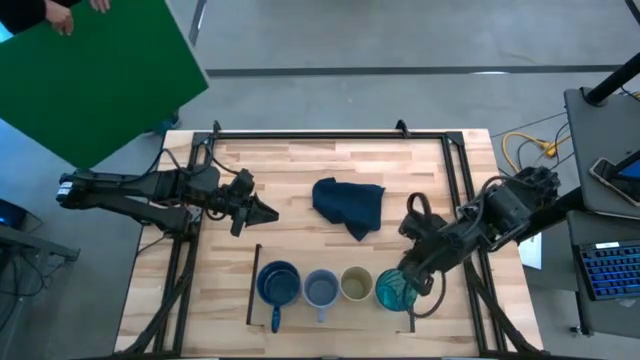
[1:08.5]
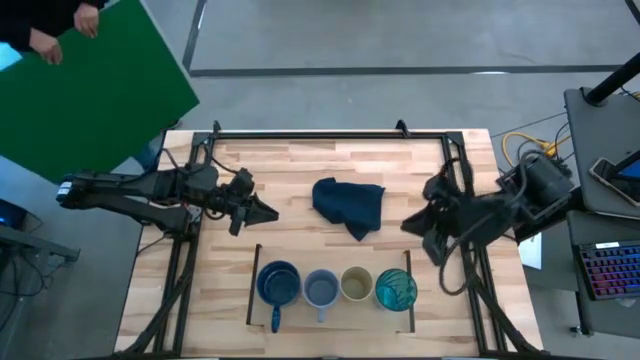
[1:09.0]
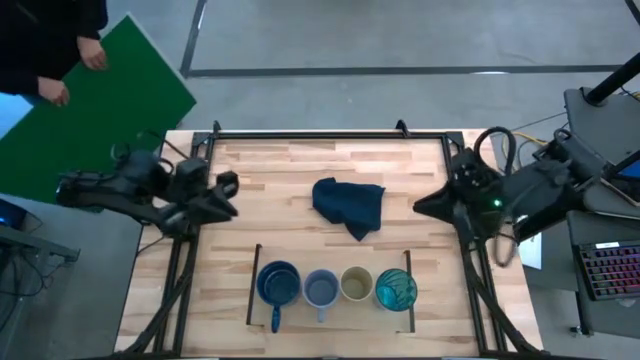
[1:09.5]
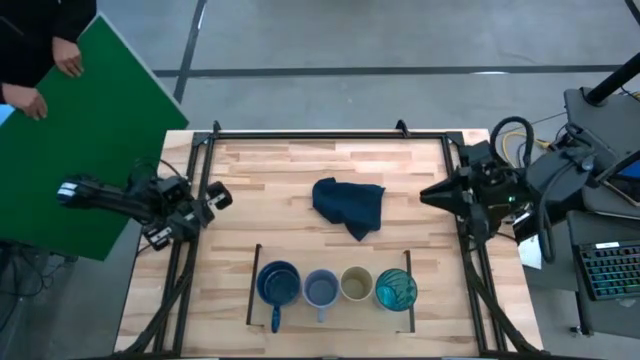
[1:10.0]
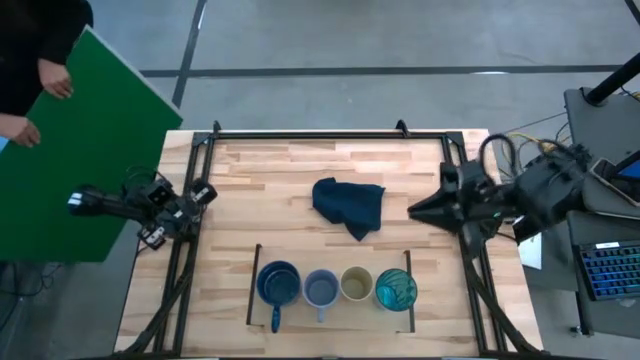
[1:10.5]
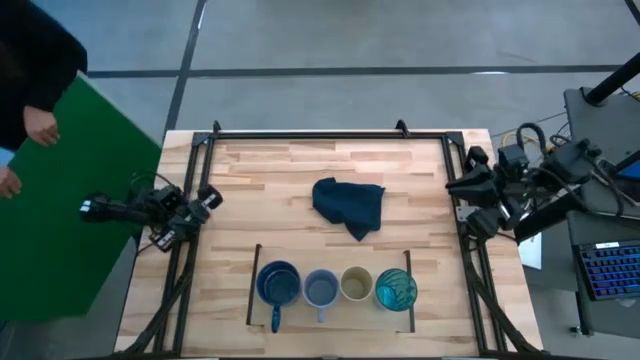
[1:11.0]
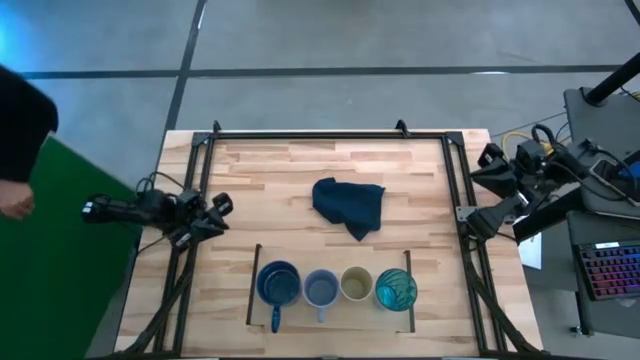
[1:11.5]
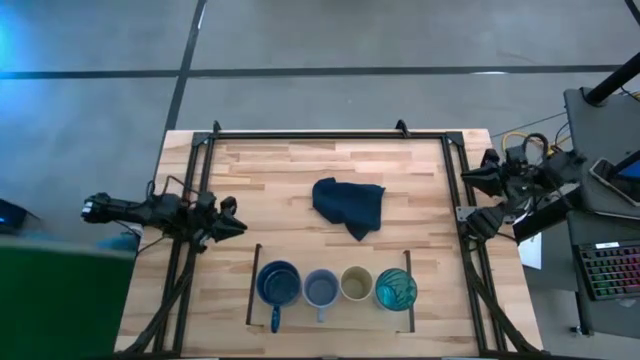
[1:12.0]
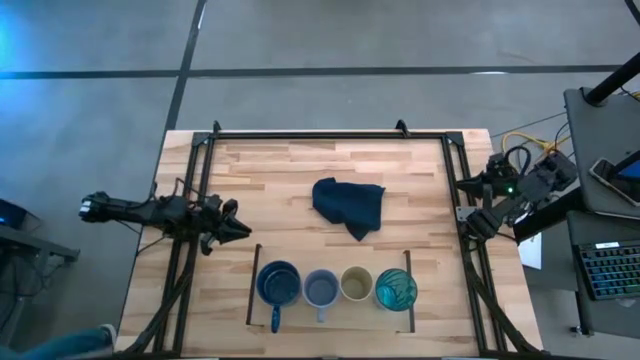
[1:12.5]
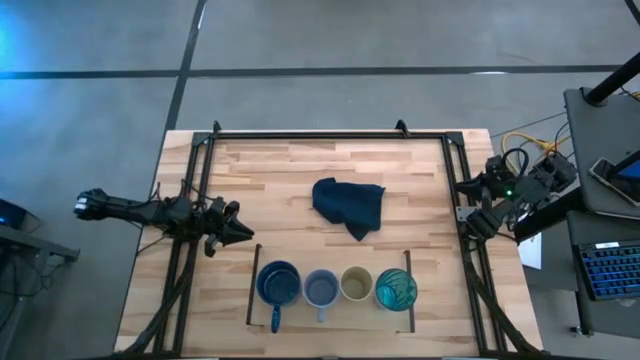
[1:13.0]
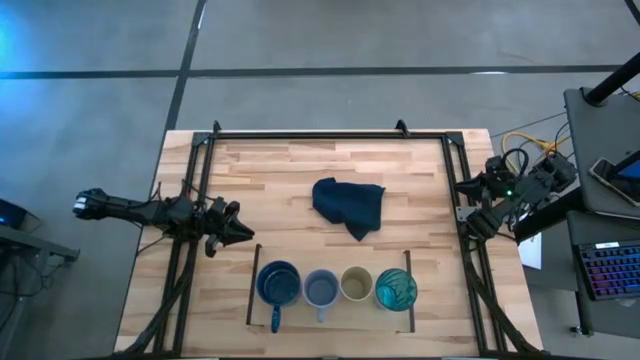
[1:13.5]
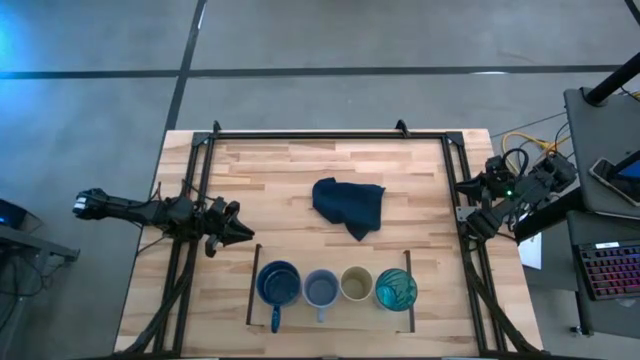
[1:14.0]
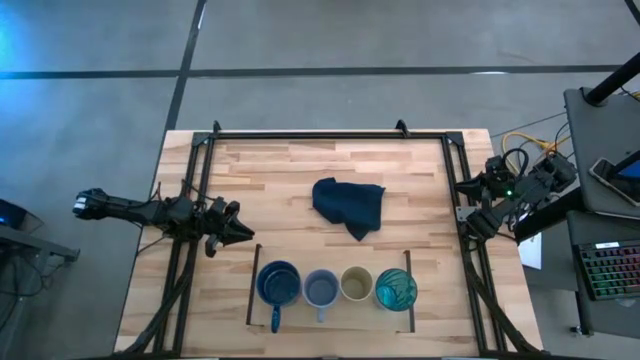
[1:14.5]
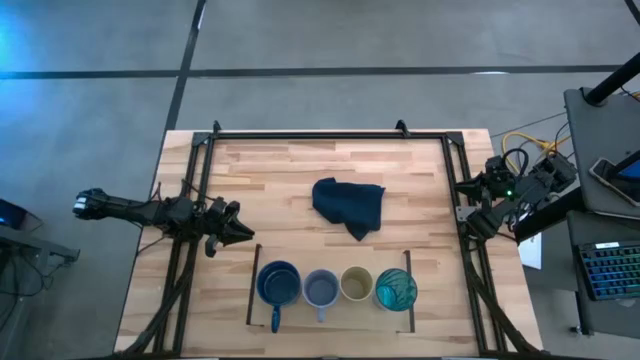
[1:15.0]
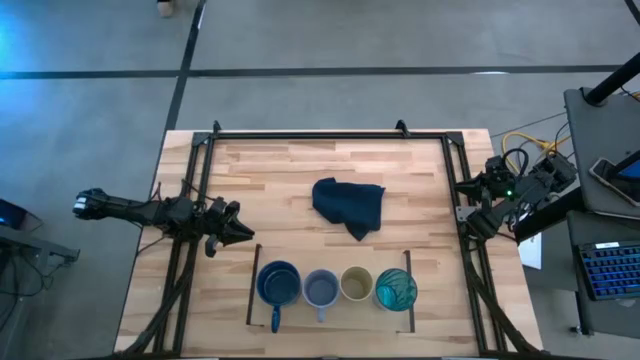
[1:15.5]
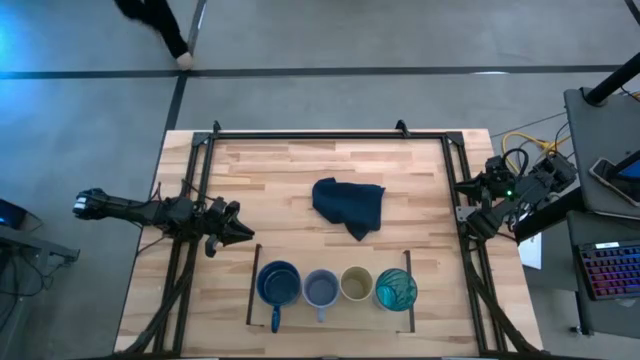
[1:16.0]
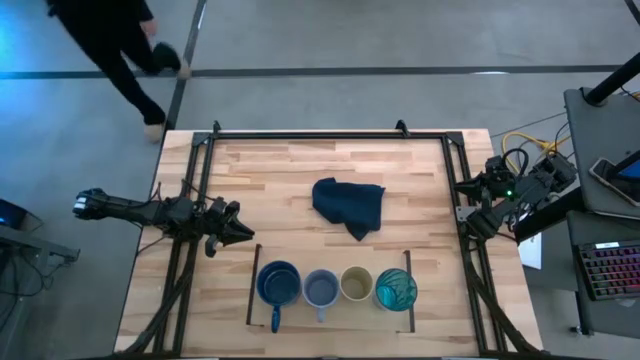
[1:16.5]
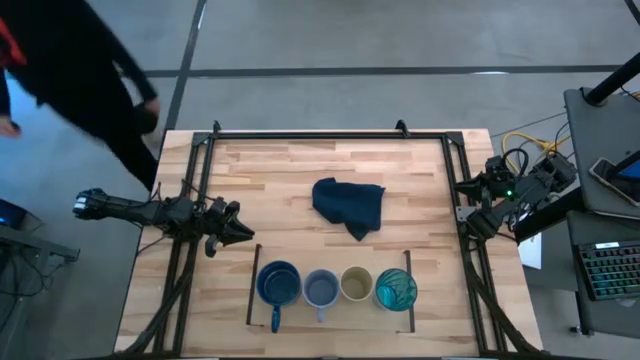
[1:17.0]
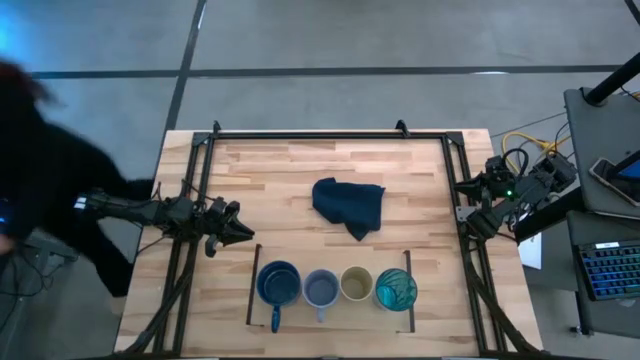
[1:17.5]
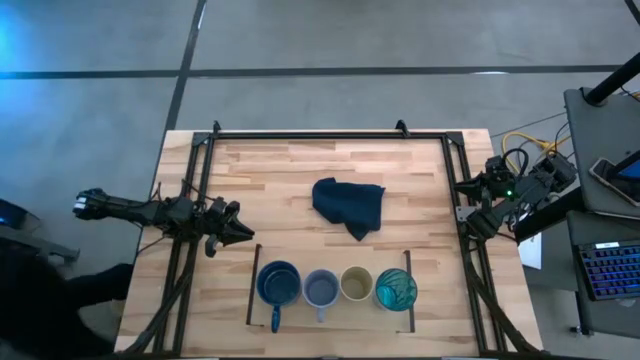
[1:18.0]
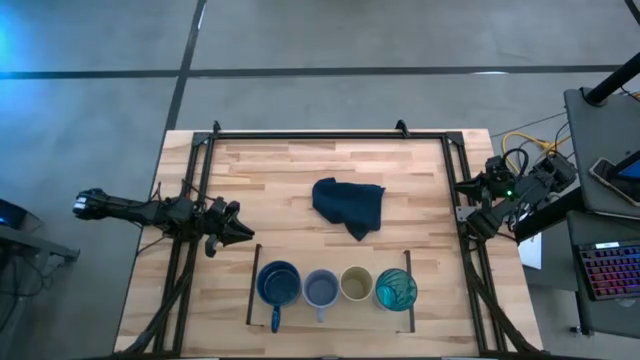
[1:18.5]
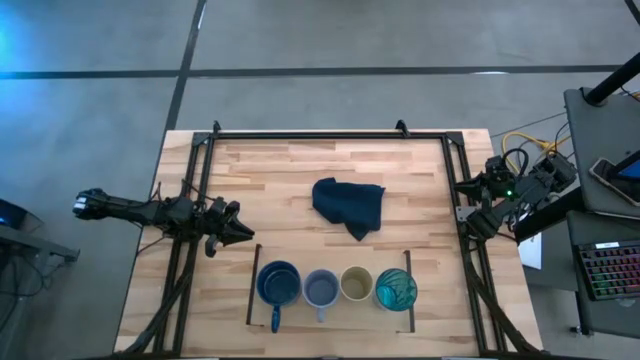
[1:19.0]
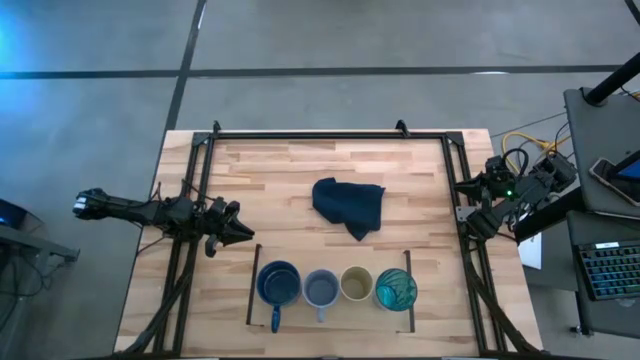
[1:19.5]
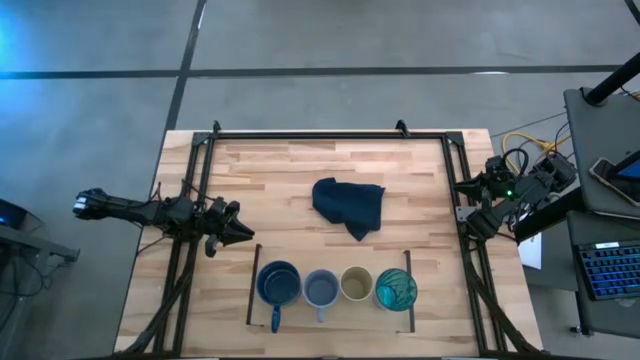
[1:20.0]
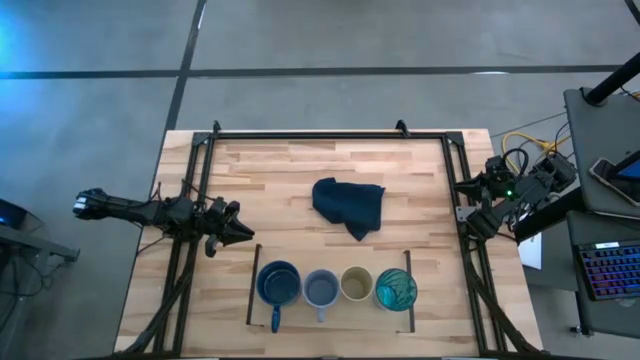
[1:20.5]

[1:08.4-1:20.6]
Task: Stack small to large cups/mugs on shelf
Return to Home Position

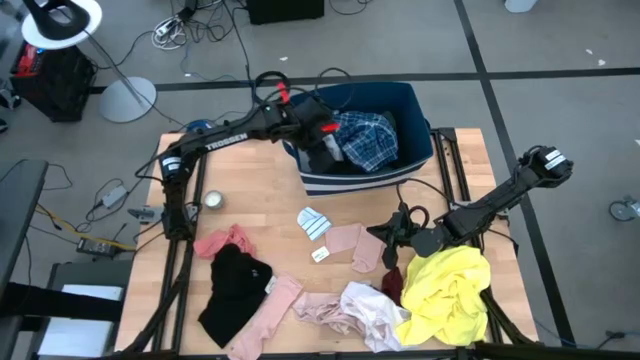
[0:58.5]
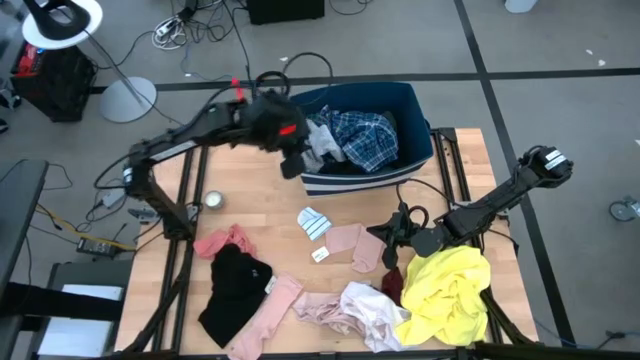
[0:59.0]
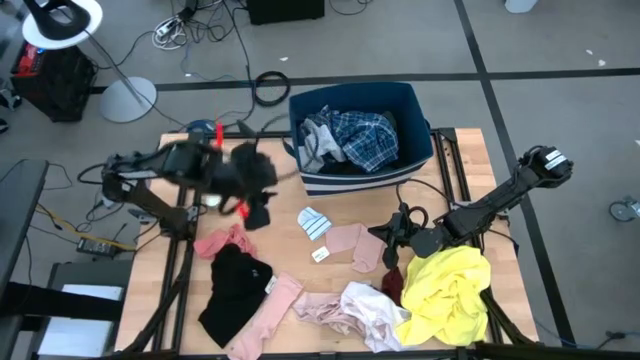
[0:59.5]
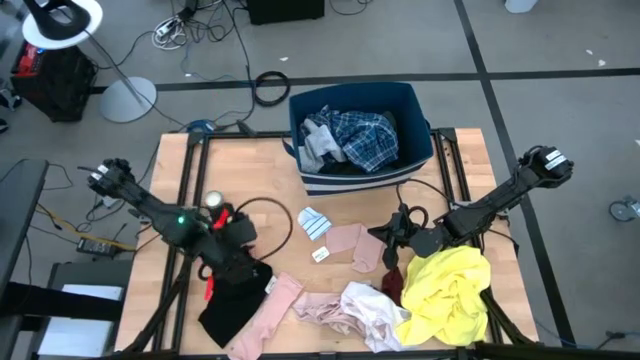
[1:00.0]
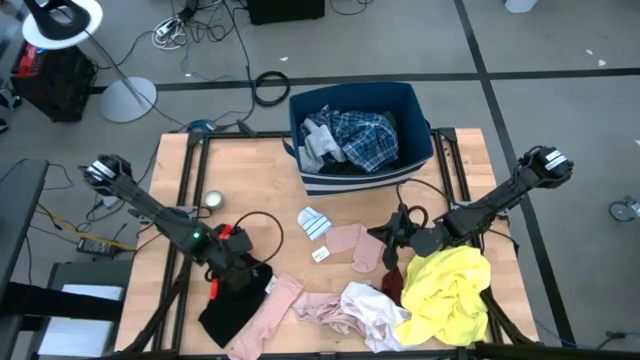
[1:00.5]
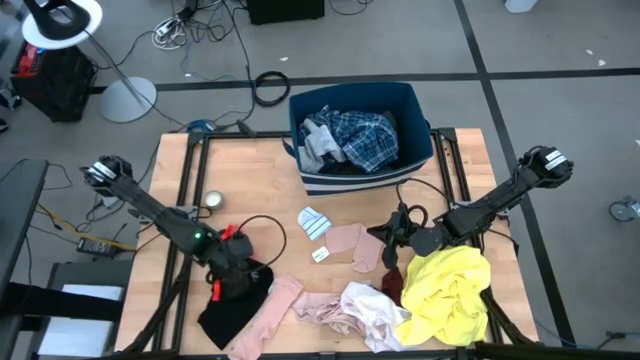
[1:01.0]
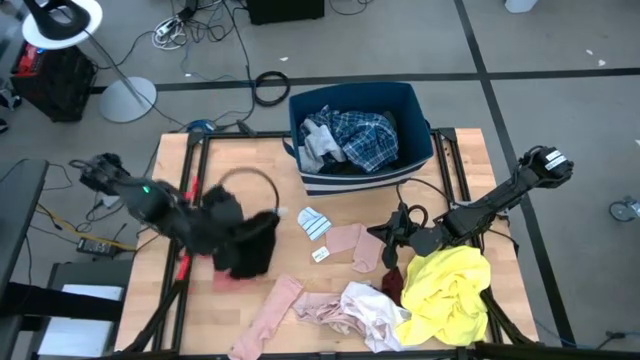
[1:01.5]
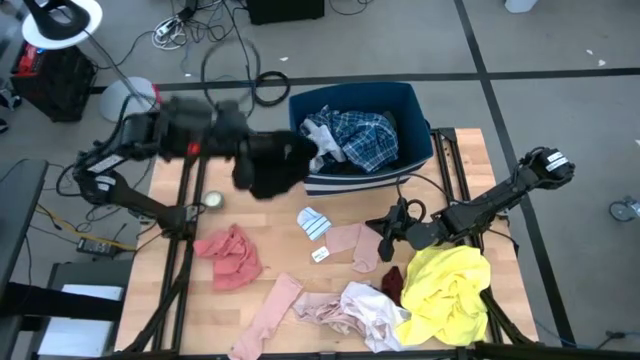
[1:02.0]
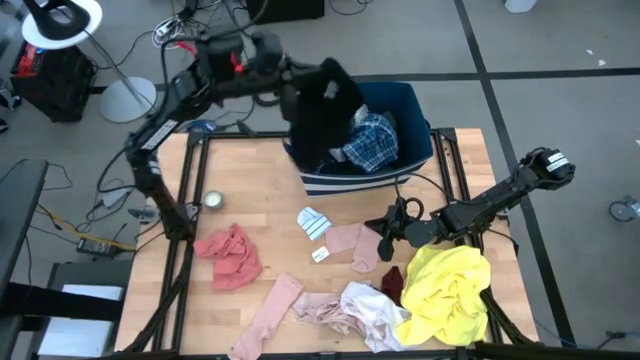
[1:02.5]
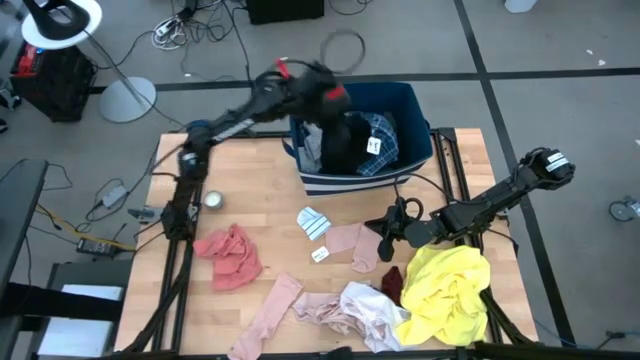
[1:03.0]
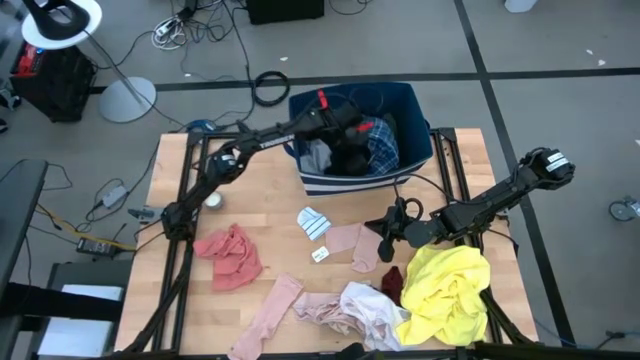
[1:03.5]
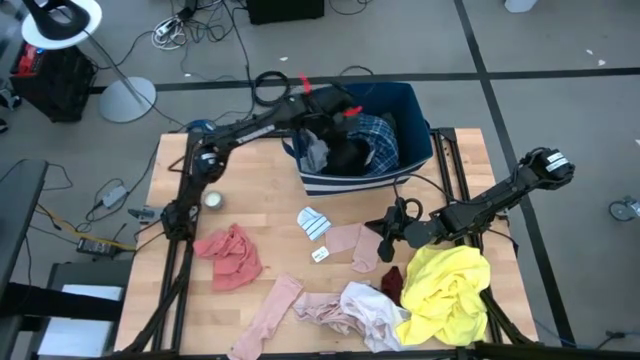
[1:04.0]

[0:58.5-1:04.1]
Task: Sort clothes
Put the black underwear into the blue laundry bin
